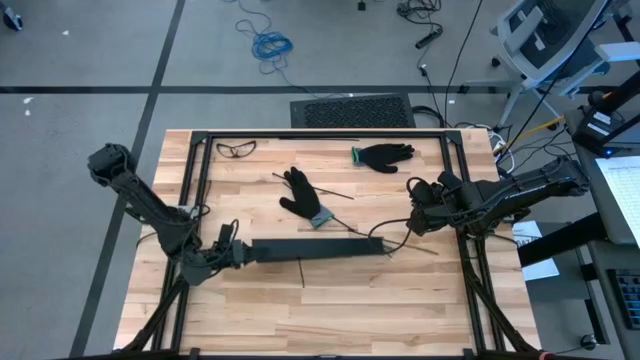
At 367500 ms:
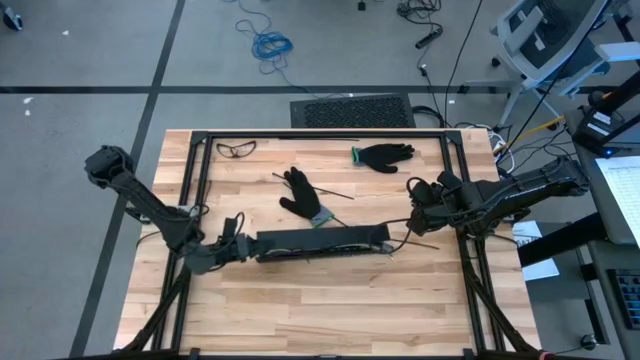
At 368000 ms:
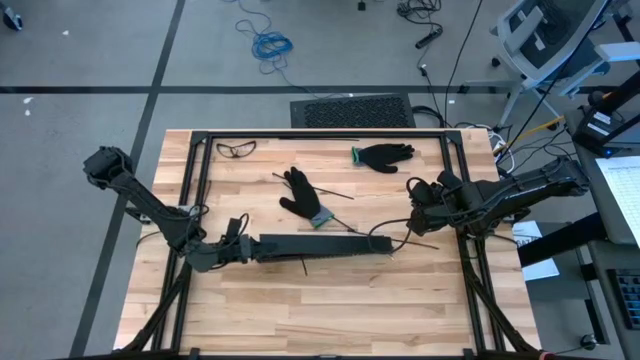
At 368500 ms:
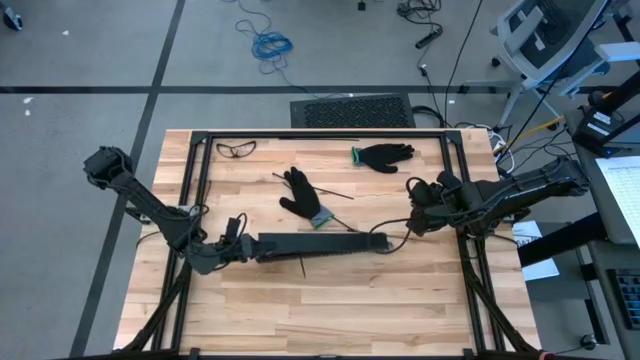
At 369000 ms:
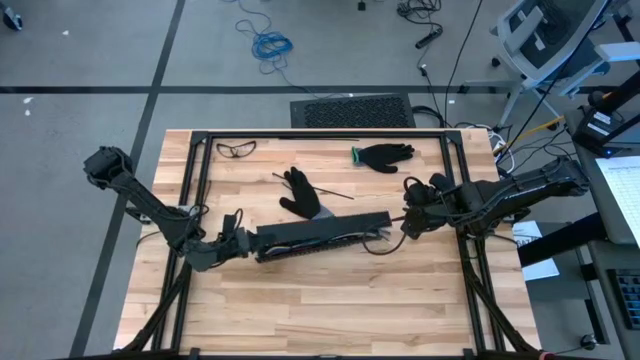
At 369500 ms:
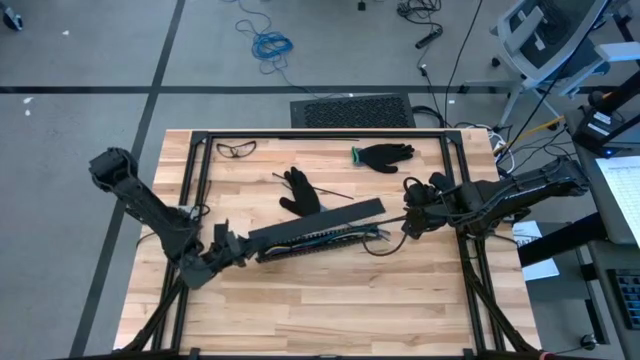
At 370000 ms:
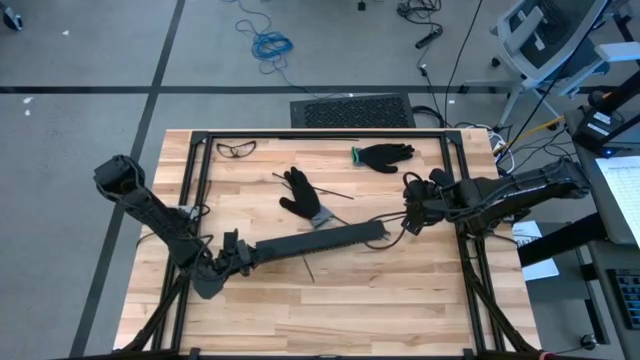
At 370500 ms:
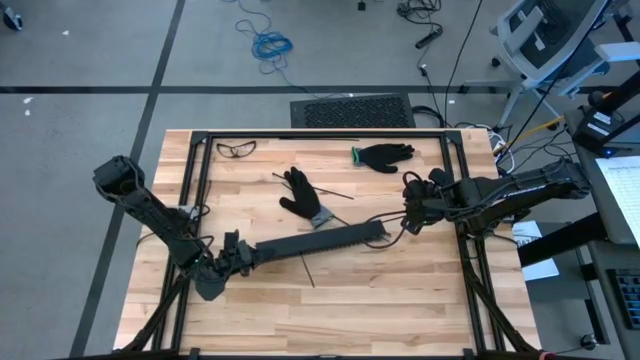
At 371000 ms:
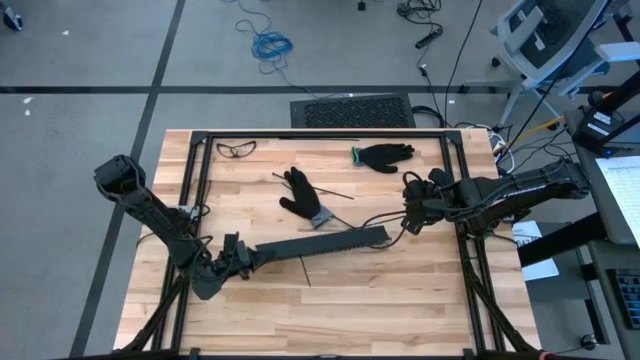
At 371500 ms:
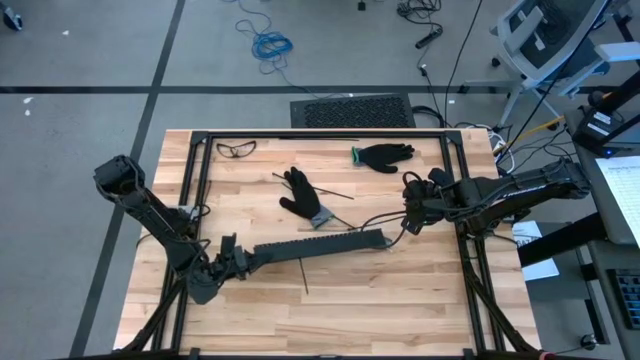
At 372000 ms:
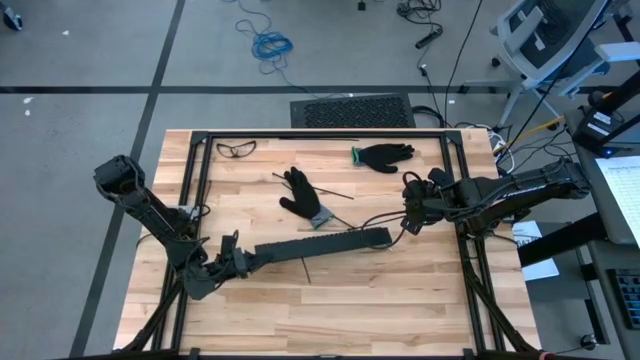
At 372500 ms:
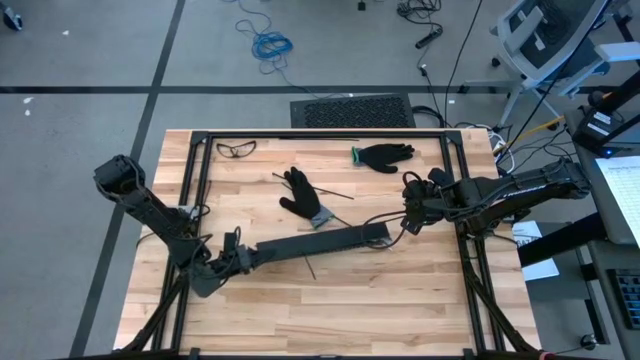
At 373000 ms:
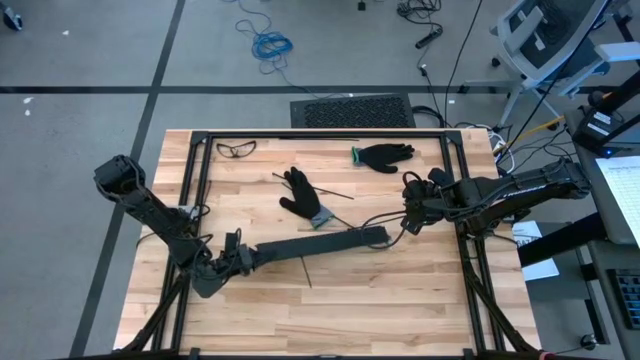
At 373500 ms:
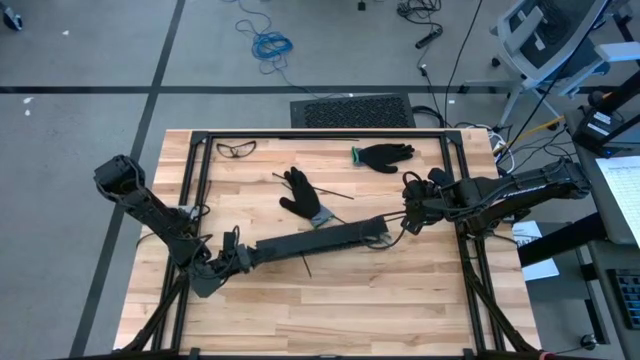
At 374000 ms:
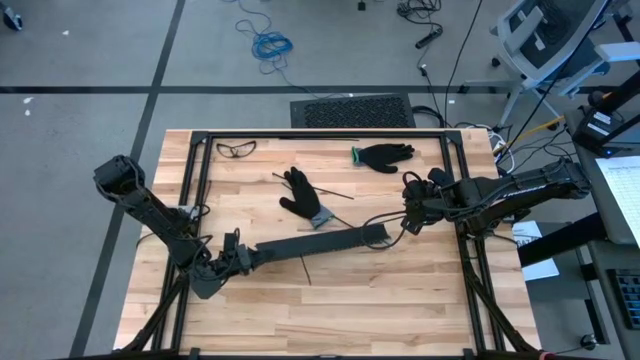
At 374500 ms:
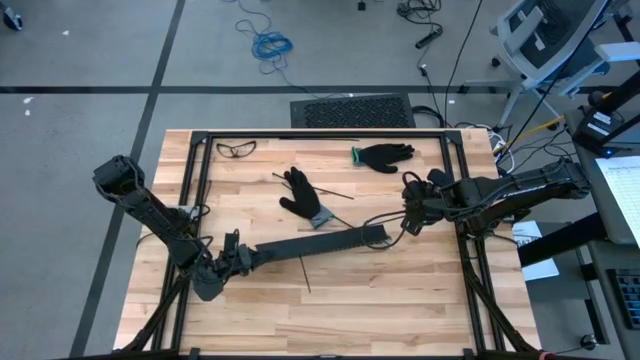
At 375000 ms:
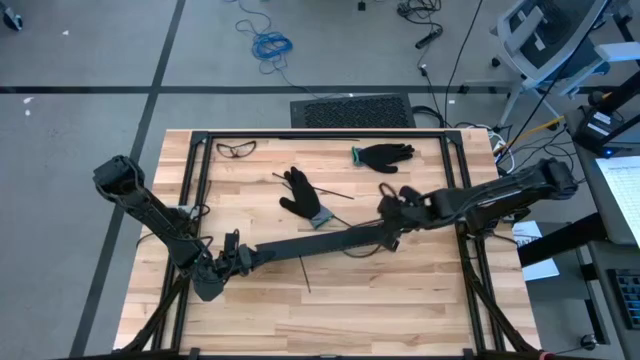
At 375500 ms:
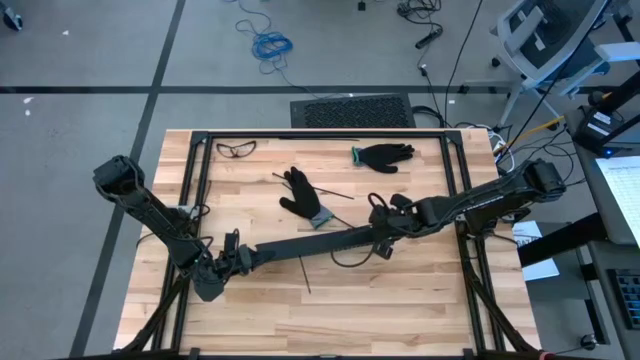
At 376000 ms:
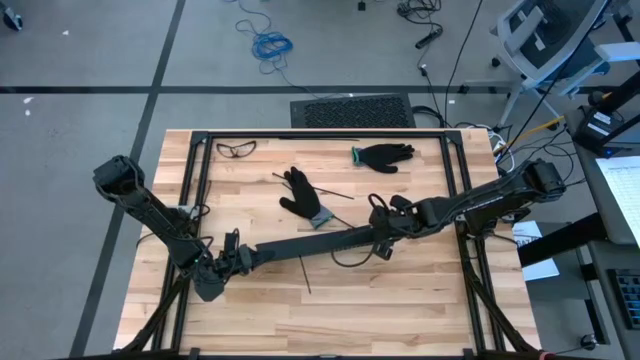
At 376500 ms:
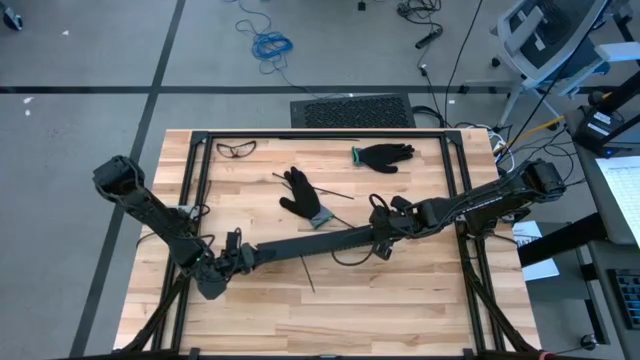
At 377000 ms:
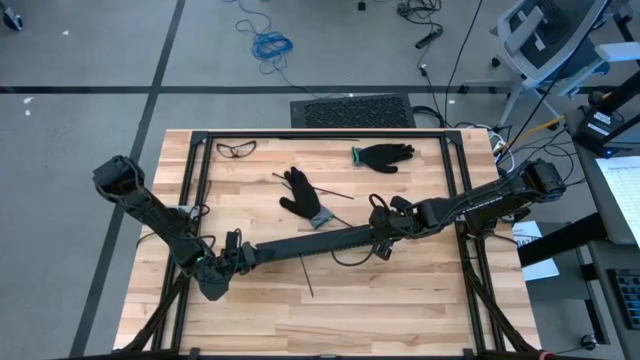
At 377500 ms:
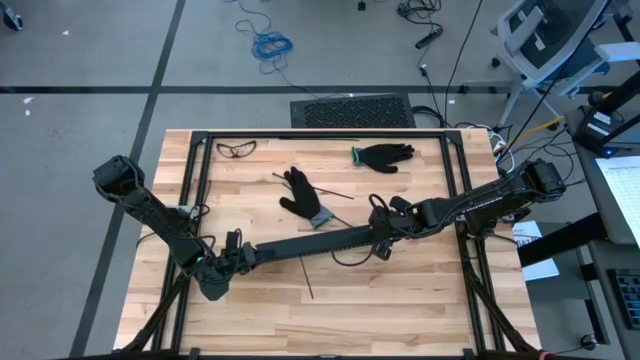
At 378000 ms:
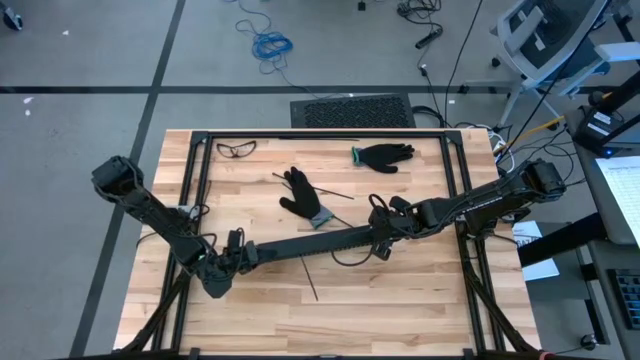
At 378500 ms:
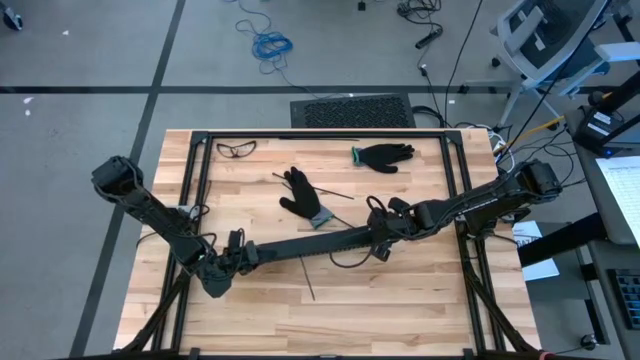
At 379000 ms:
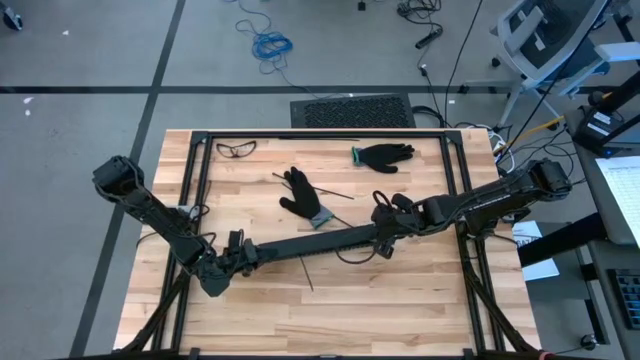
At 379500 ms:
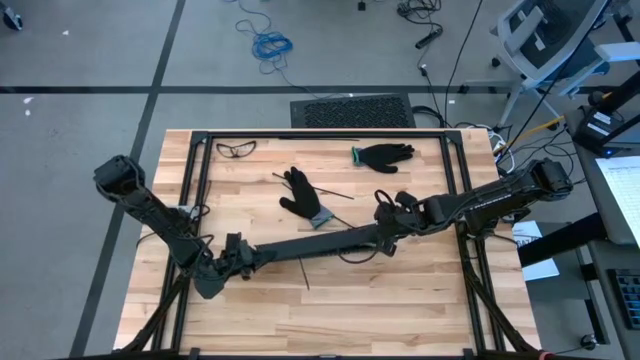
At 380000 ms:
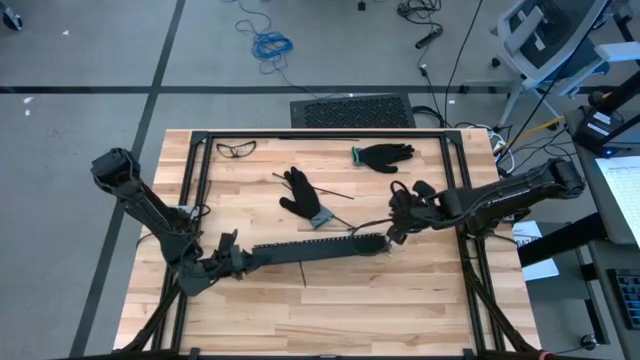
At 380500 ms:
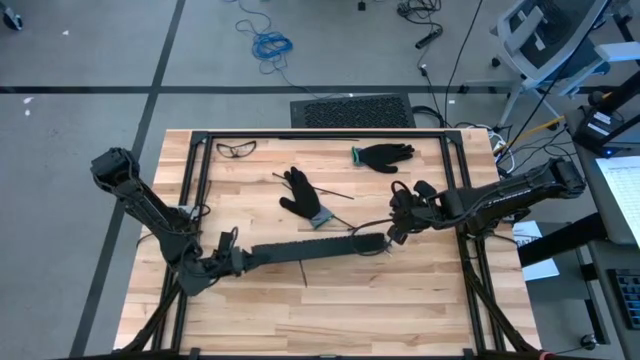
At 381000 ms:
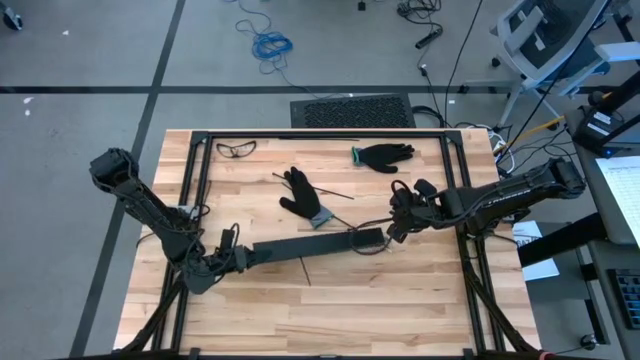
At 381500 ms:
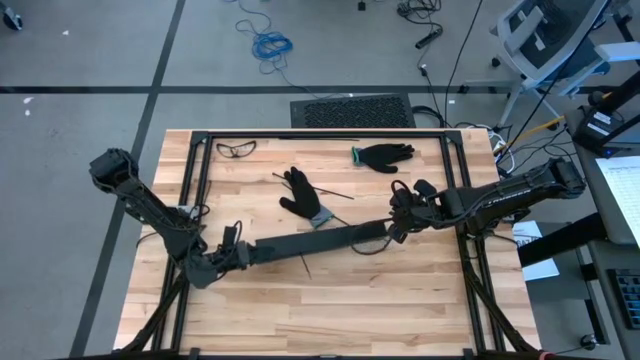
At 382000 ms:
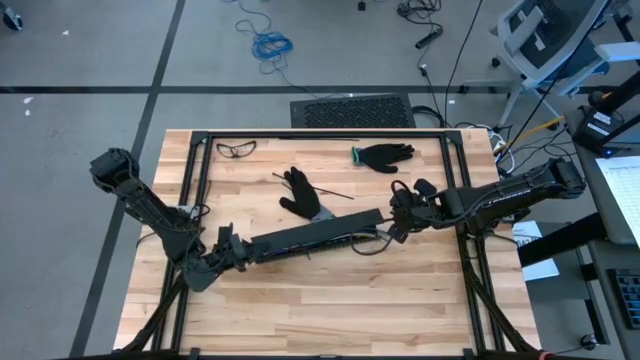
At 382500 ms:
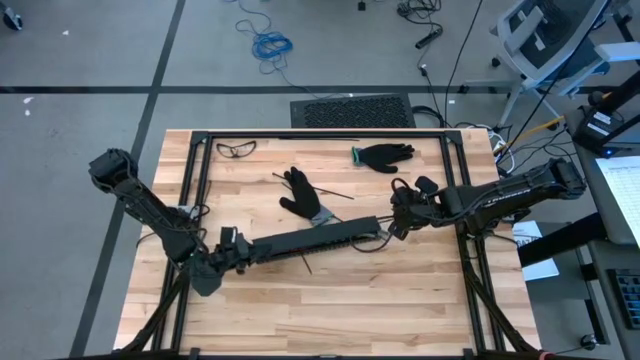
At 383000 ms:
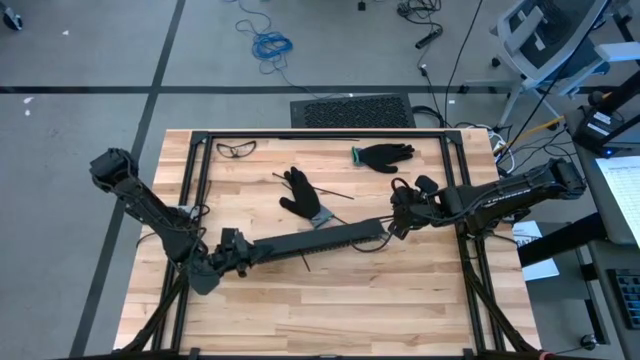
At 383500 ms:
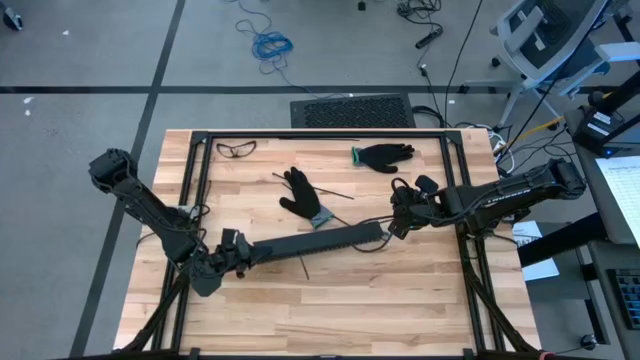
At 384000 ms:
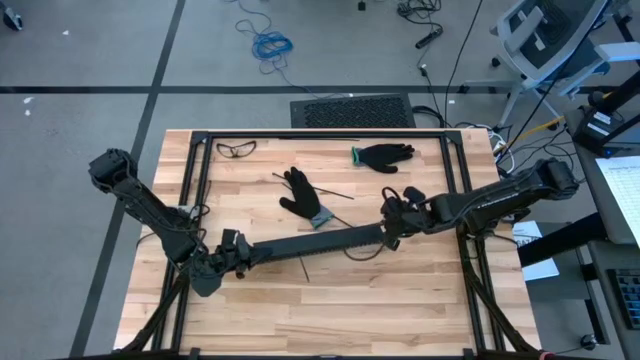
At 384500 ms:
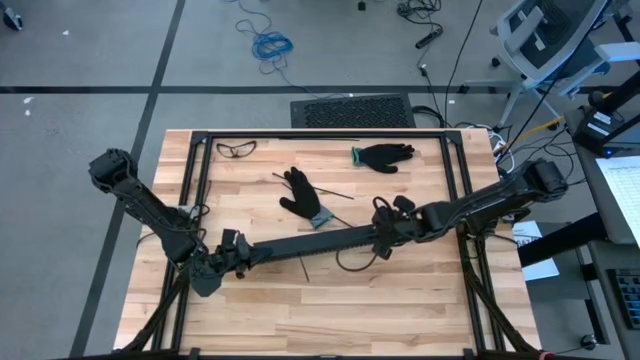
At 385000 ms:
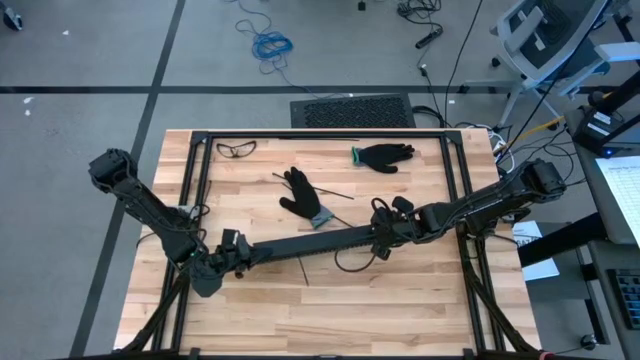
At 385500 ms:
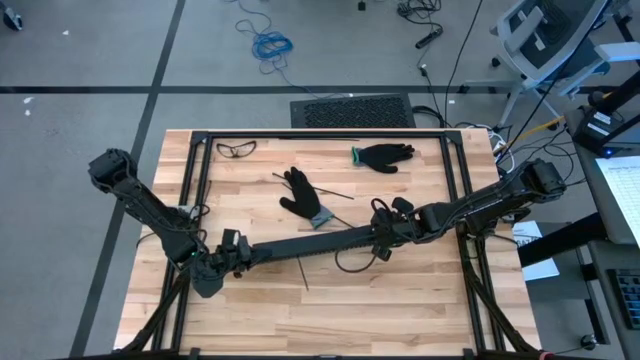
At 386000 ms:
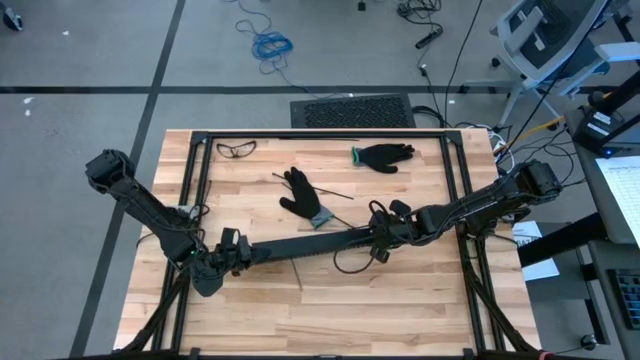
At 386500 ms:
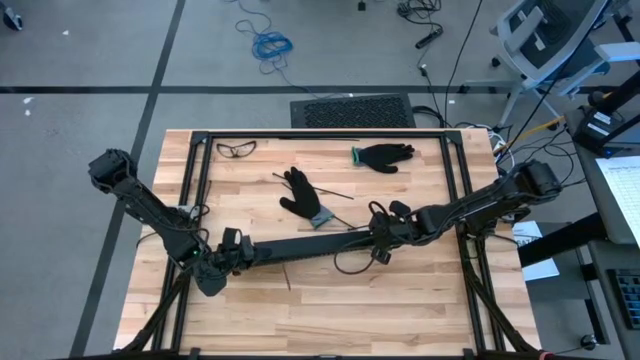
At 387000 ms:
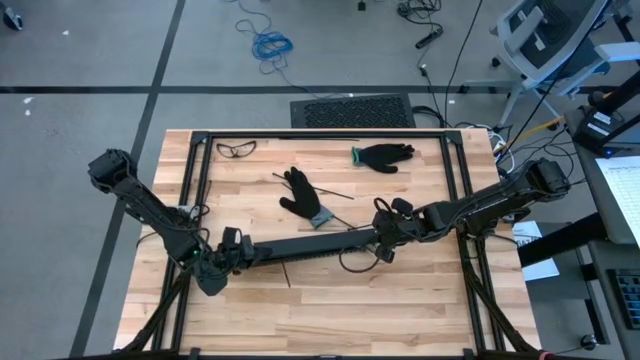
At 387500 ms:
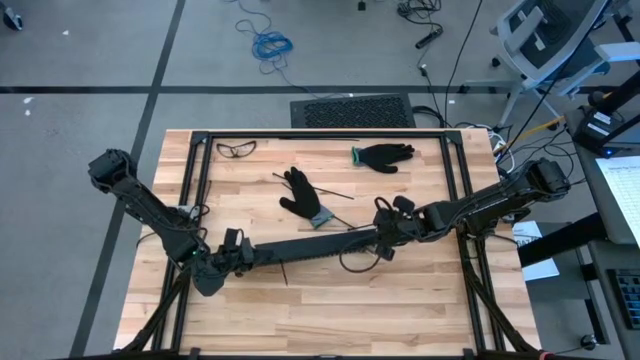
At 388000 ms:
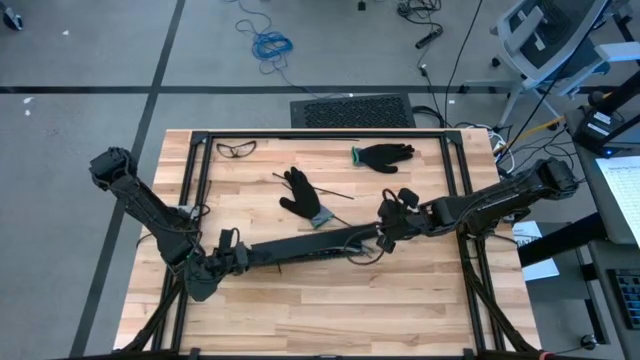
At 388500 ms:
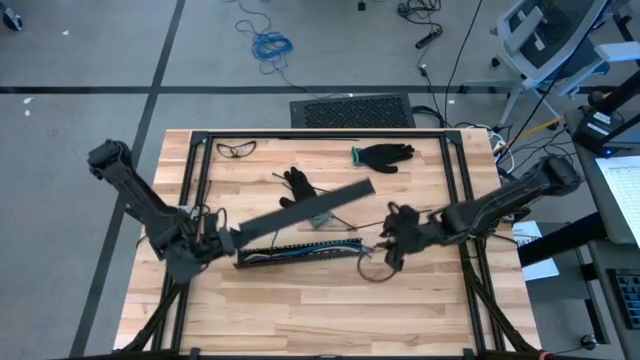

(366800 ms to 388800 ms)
Task: Ziptie cables
Insert the black cover of the black cable duct
